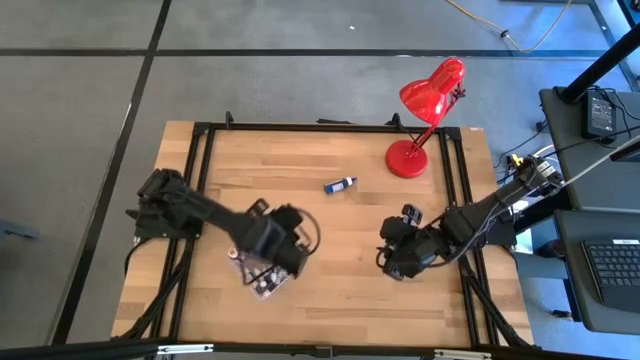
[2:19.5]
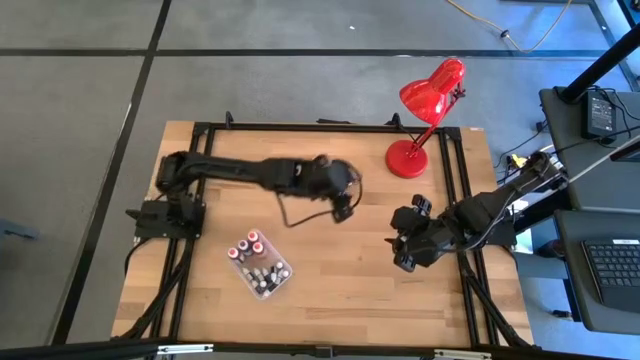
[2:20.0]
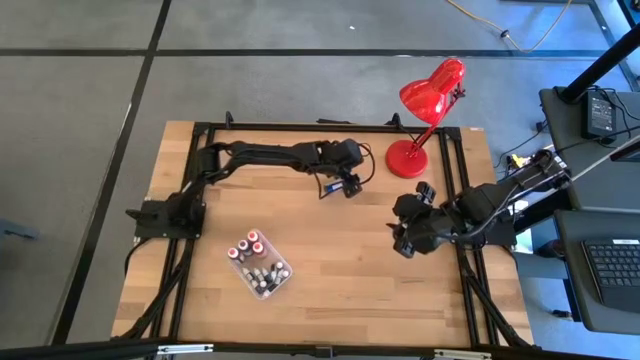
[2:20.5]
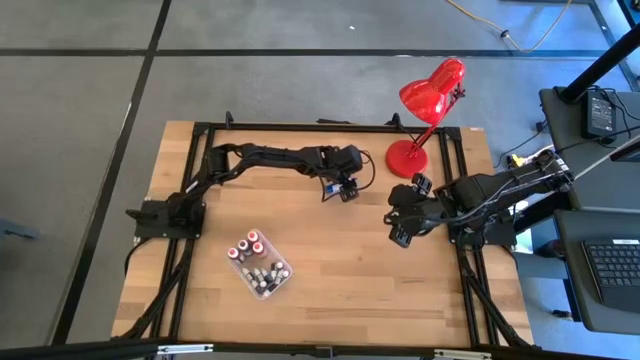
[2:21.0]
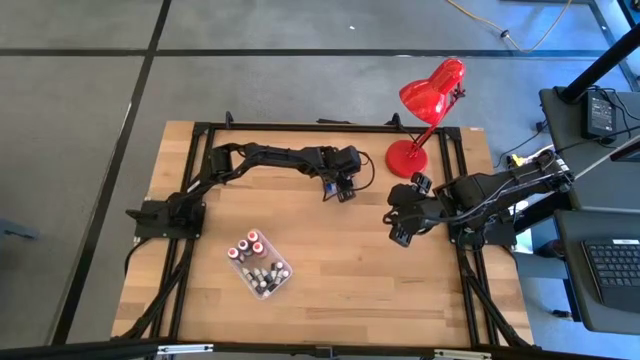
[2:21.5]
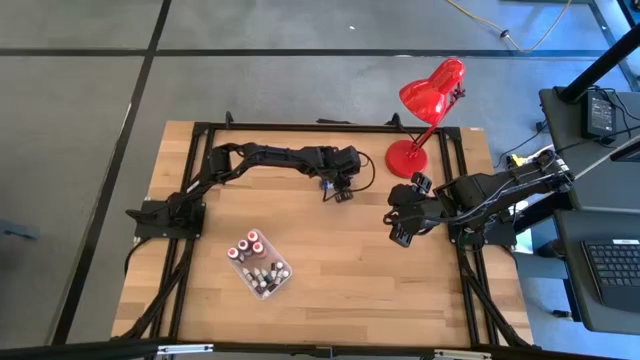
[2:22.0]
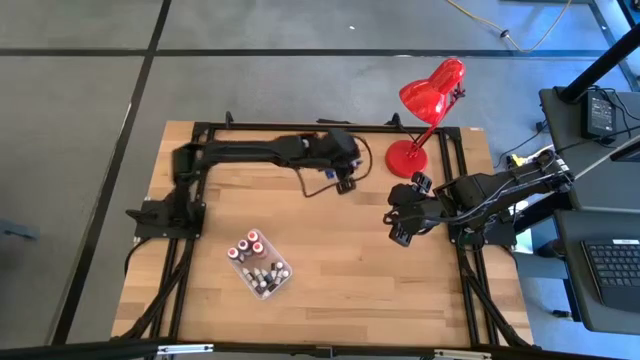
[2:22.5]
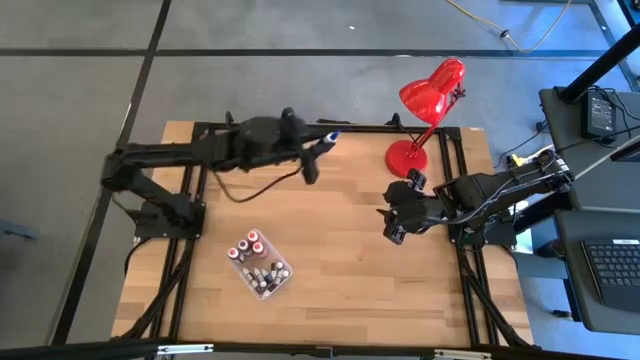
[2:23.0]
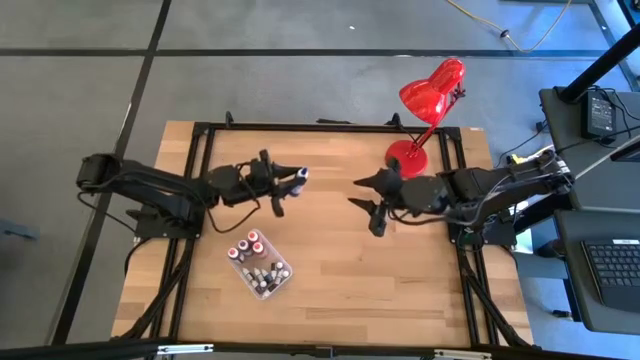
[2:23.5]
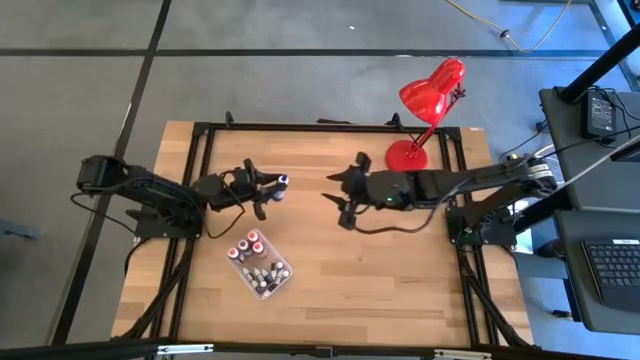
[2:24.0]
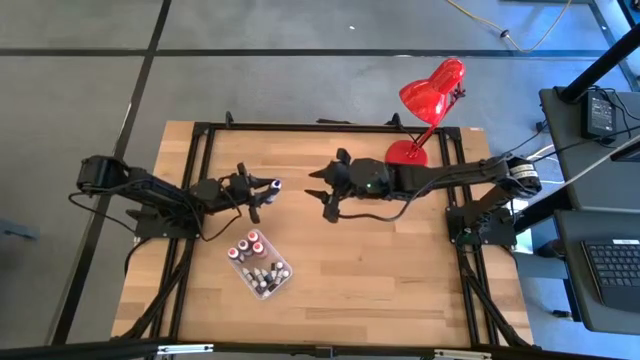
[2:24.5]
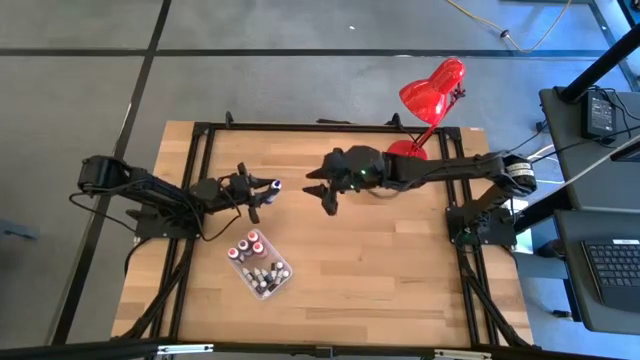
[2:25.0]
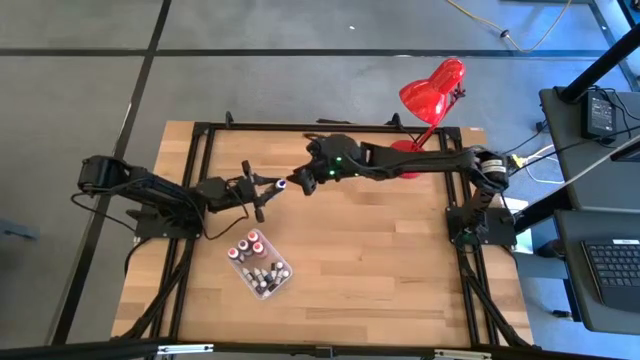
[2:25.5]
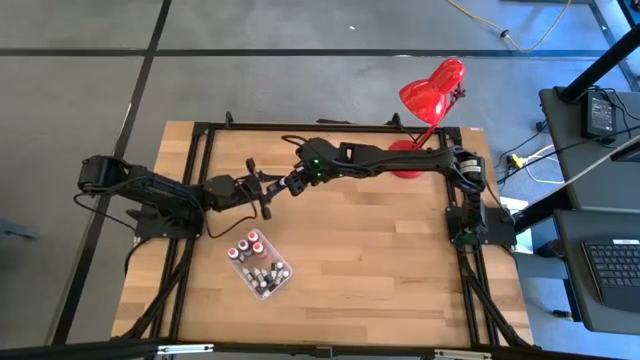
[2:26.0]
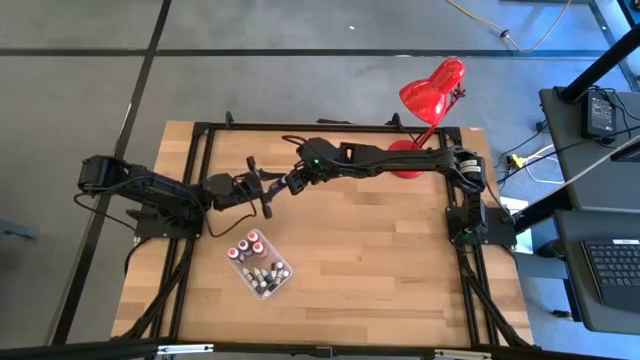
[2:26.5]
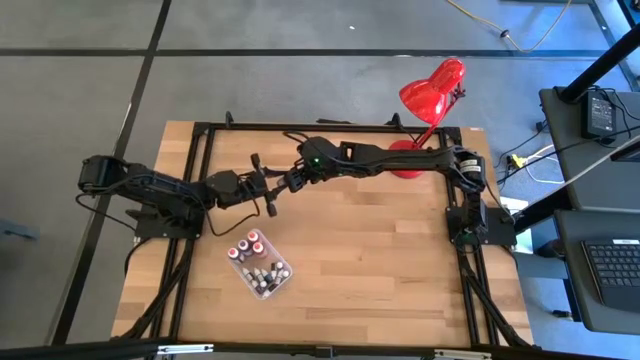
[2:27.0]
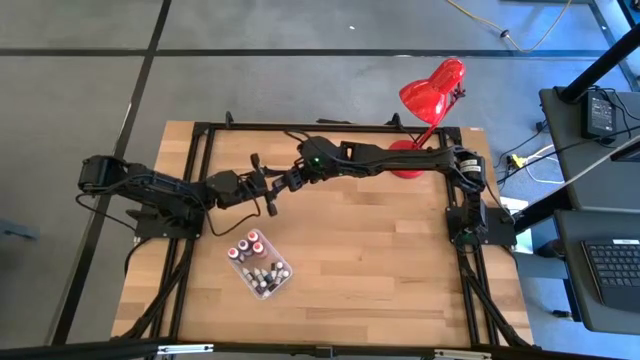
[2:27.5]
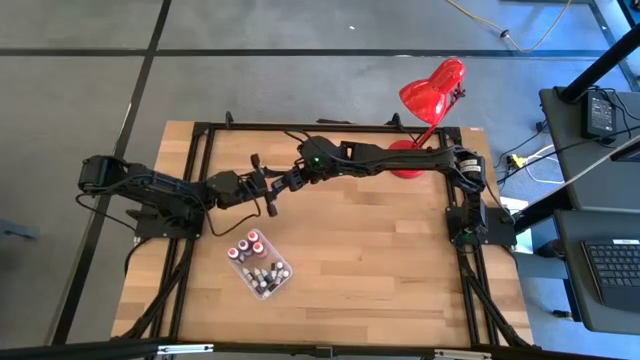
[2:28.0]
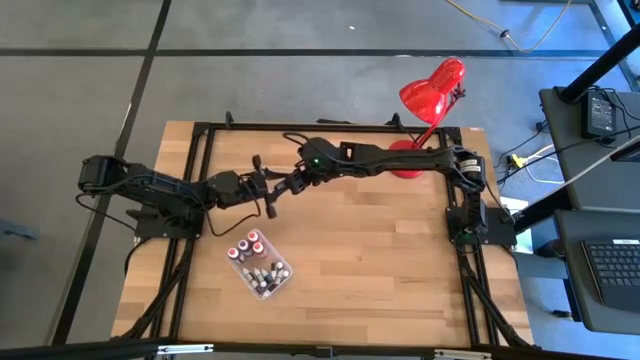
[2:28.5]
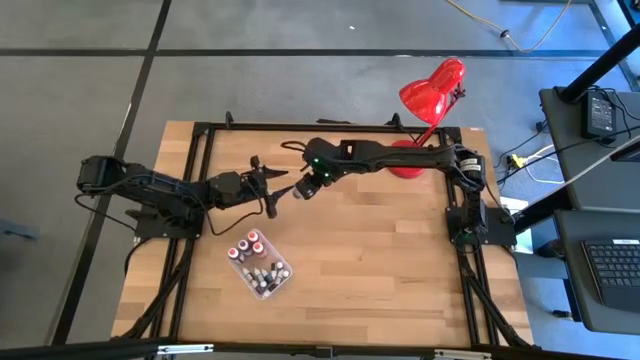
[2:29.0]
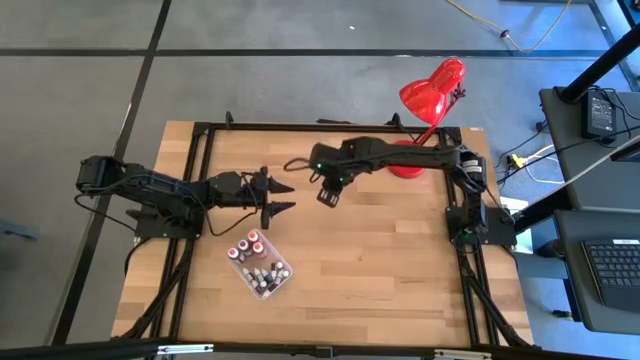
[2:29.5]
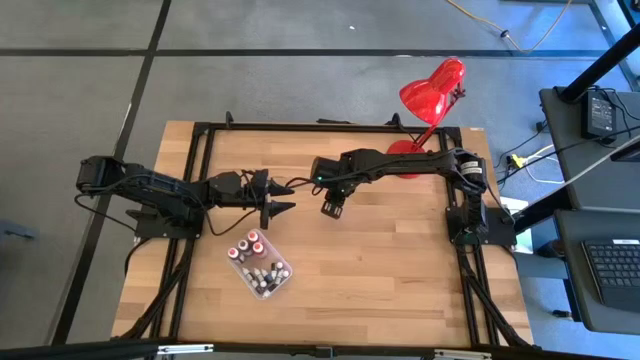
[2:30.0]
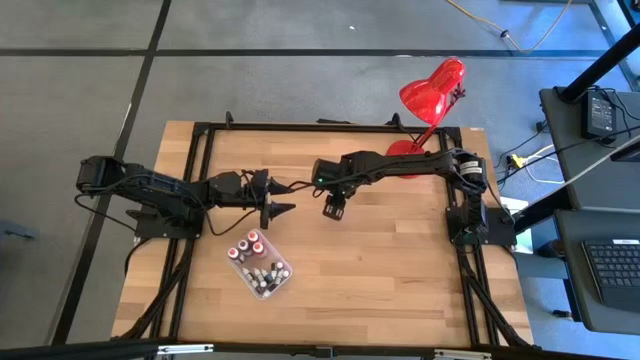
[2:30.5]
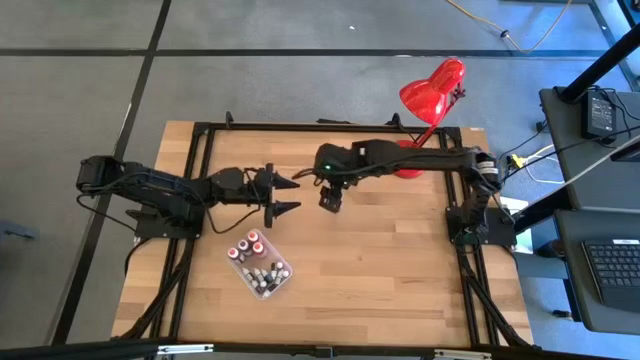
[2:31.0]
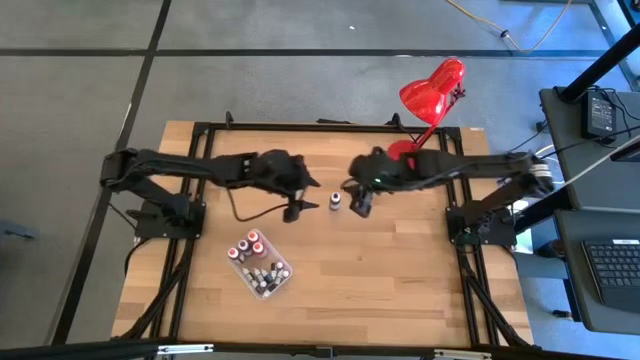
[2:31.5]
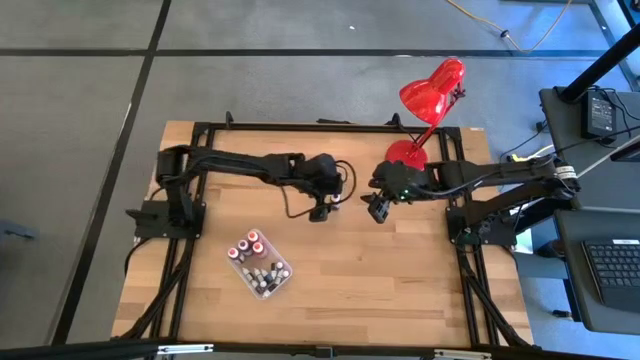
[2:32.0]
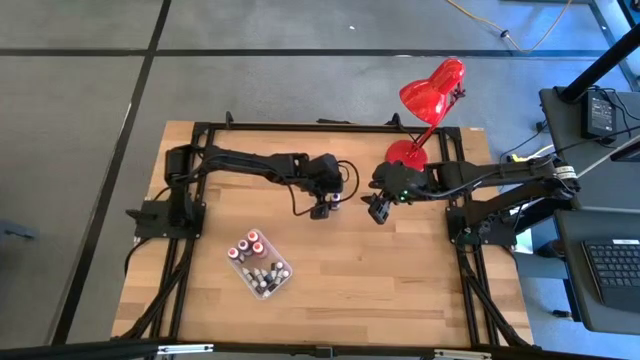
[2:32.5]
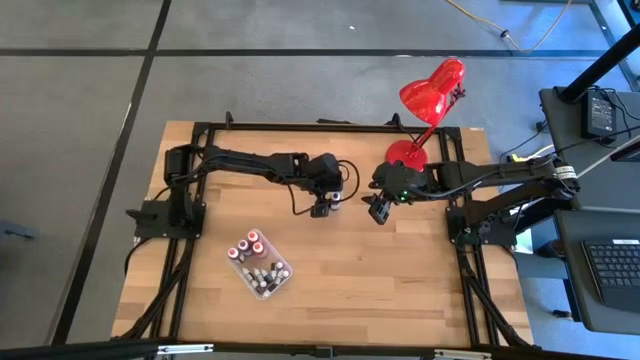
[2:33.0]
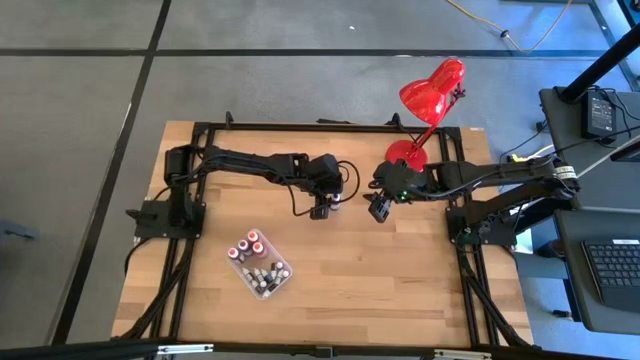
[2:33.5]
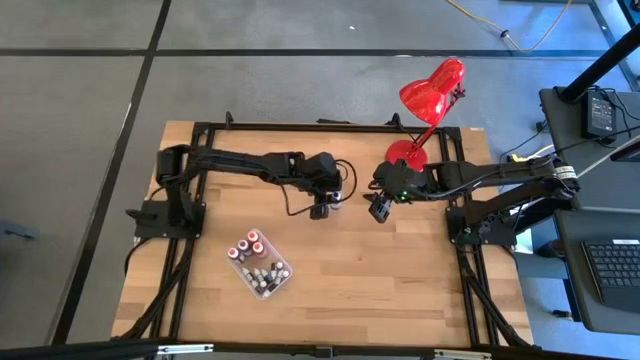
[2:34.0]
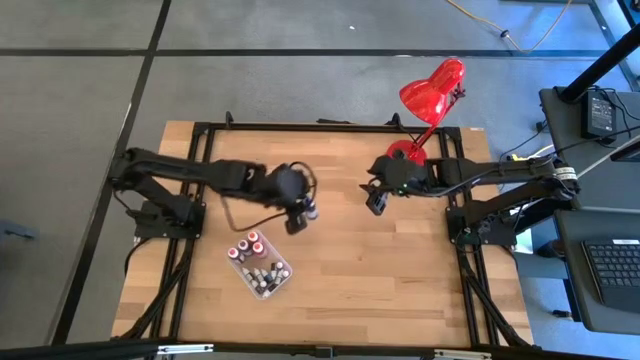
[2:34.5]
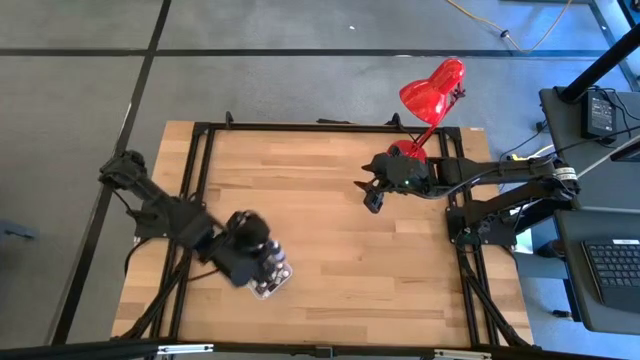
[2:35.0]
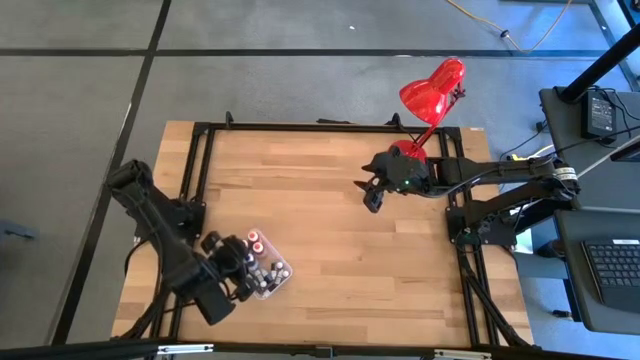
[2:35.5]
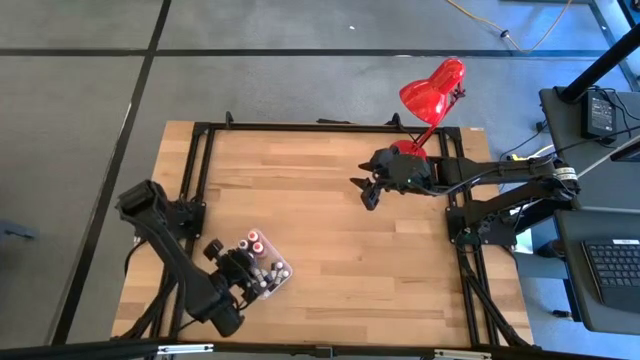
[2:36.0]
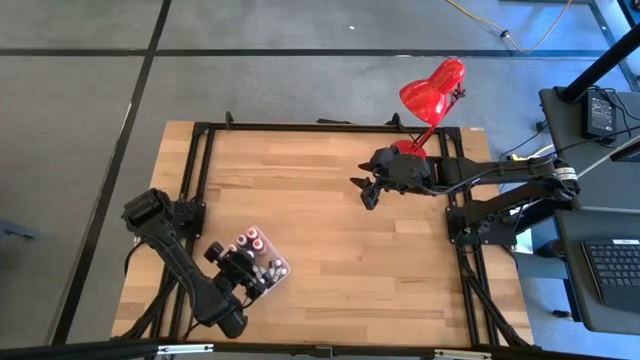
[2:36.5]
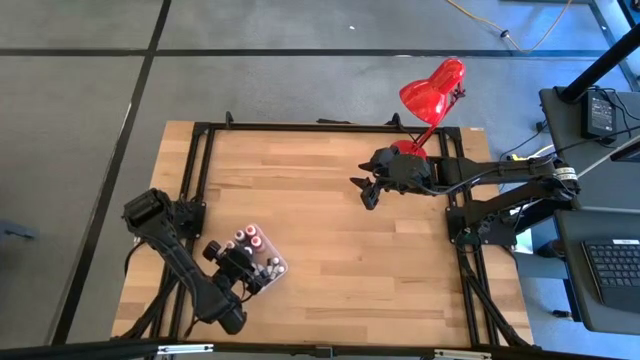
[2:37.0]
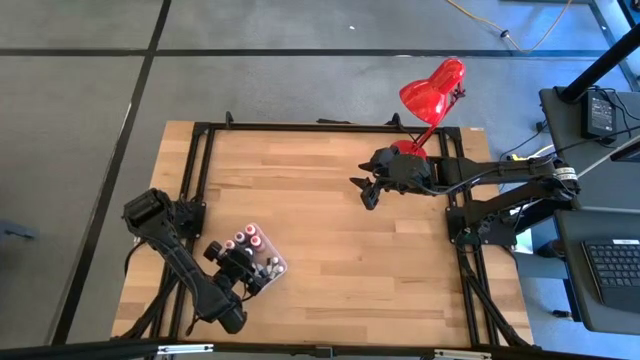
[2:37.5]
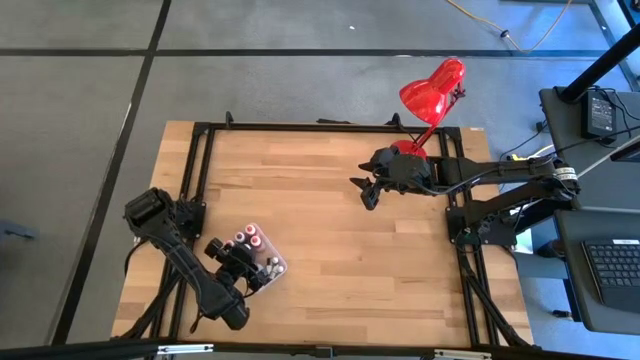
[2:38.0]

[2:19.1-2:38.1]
Task: Pick & Place food coloring
Put the blue food coloring bottle into the transparent bin

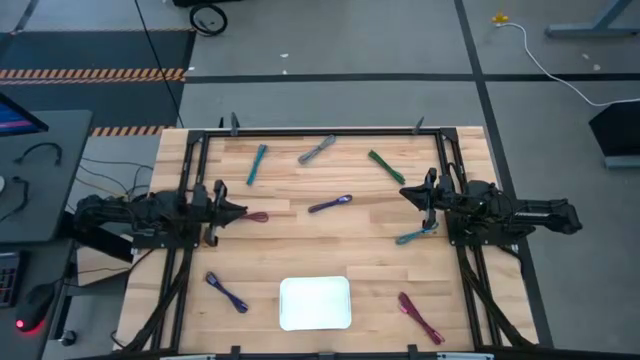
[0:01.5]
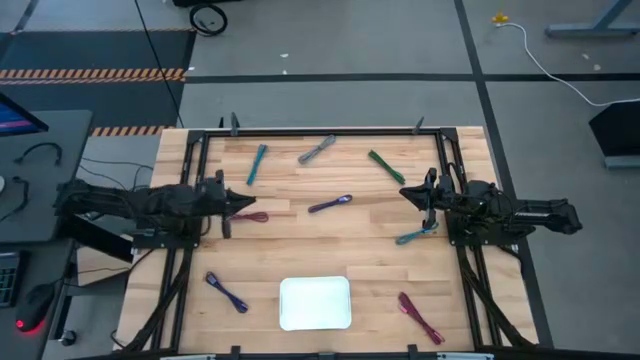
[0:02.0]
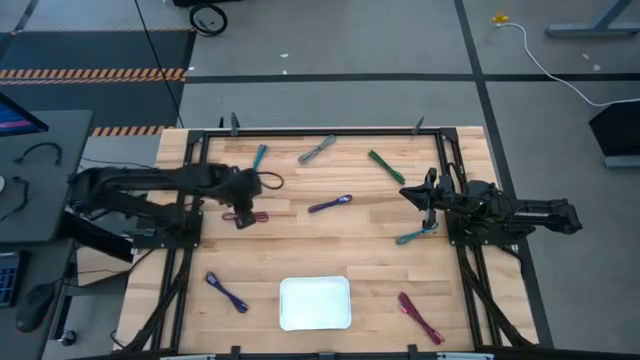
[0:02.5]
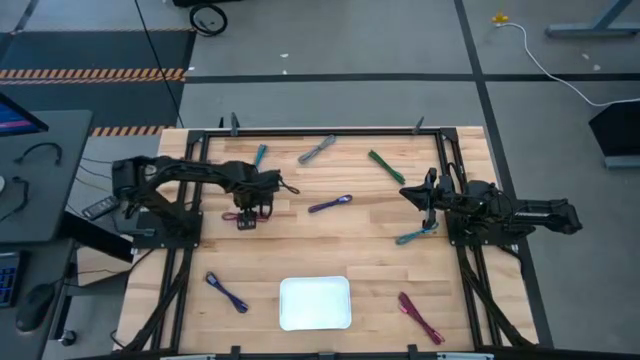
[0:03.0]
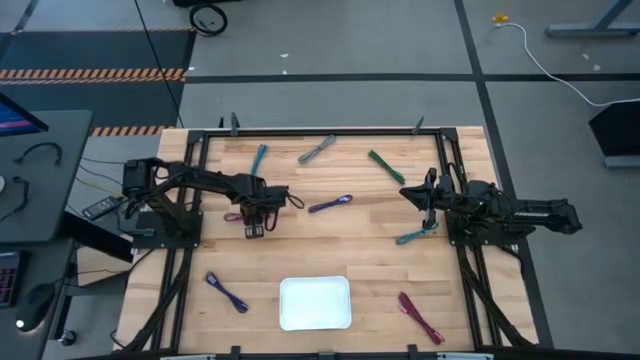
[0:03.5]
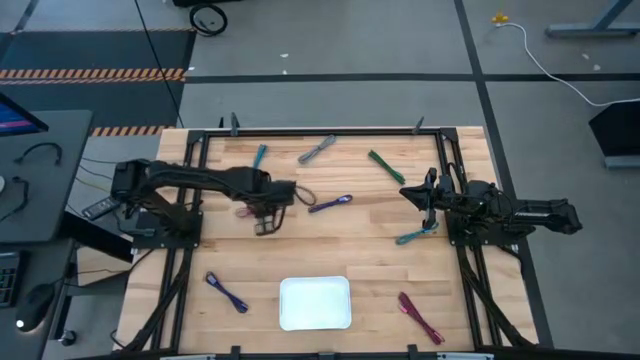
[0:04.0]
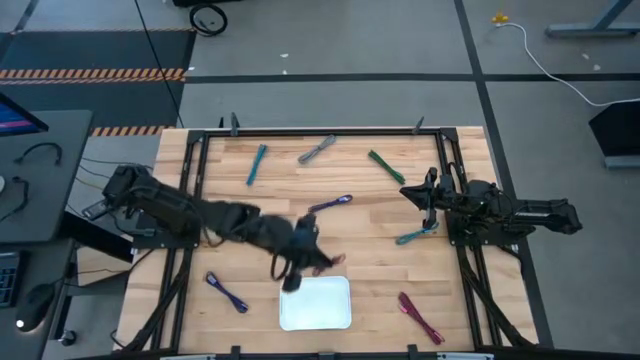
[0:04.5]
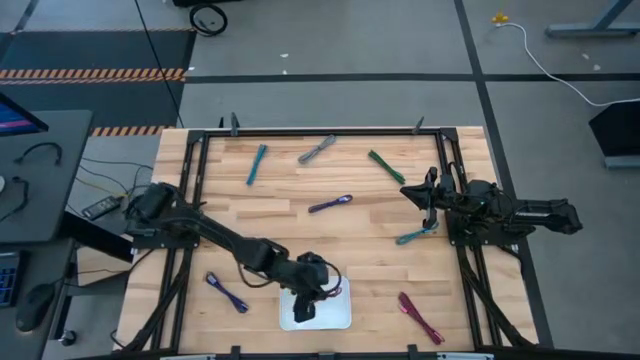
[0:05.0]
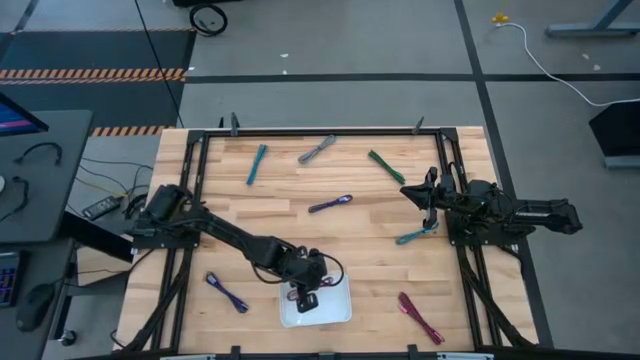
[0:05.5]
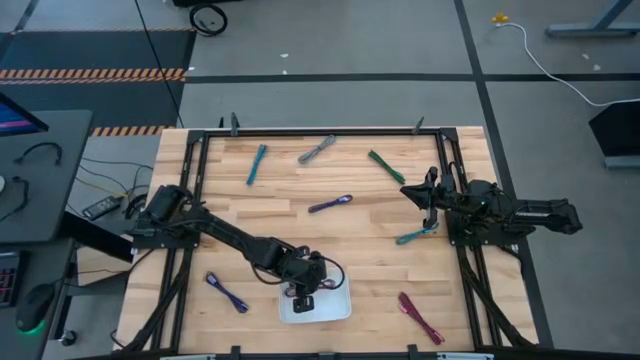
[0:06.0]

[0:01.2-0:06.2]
Task: Pick and place USB-C Cables
Put the left pink USB cable into the white bin
